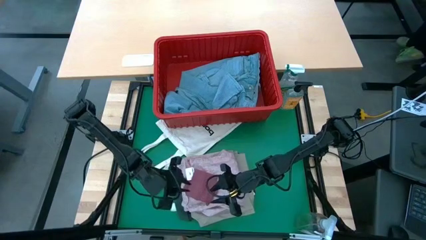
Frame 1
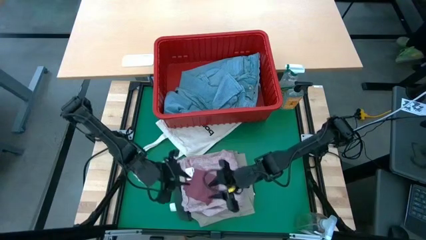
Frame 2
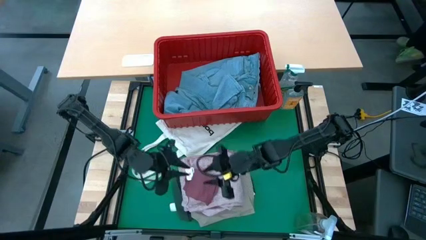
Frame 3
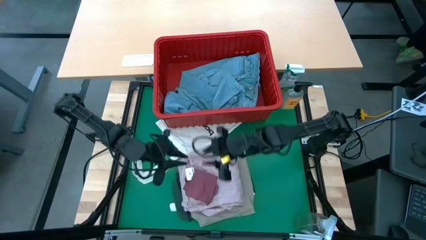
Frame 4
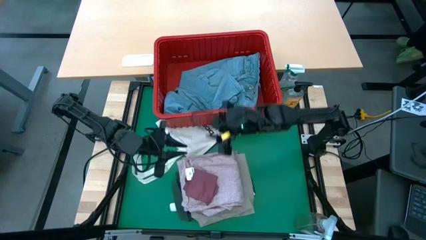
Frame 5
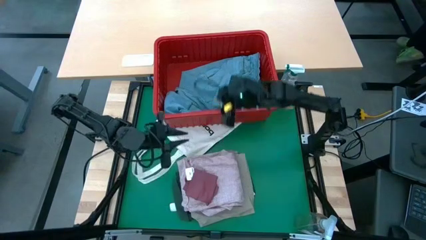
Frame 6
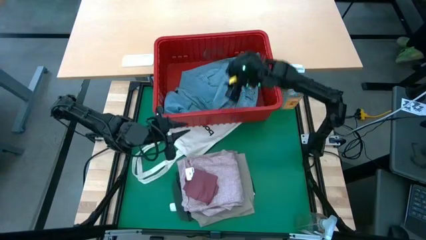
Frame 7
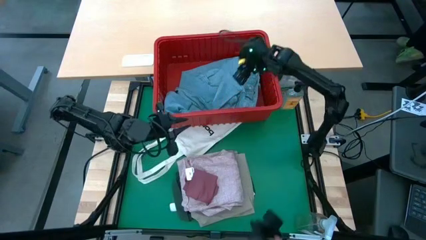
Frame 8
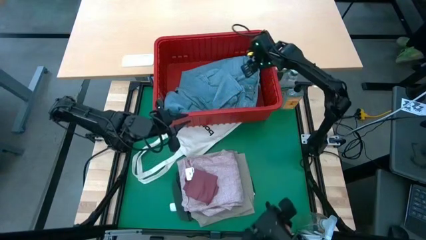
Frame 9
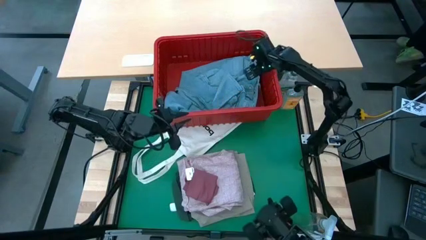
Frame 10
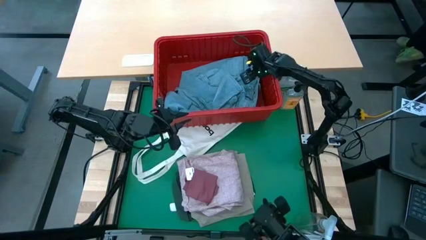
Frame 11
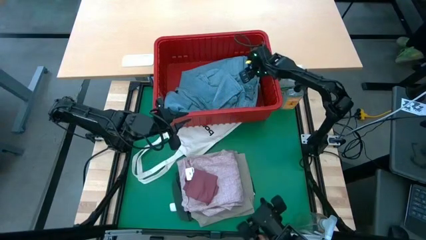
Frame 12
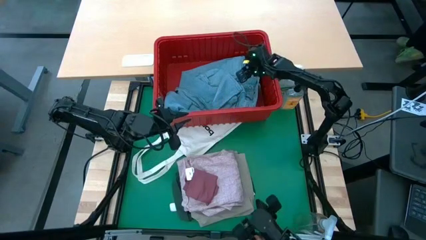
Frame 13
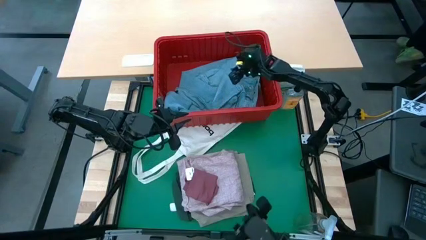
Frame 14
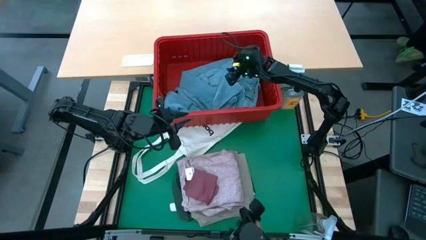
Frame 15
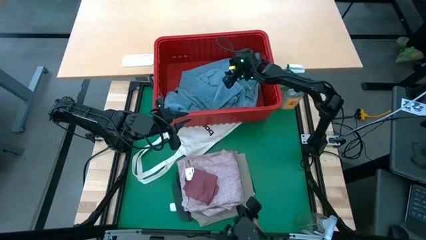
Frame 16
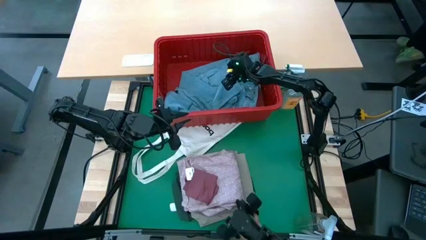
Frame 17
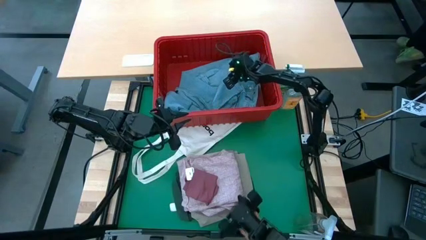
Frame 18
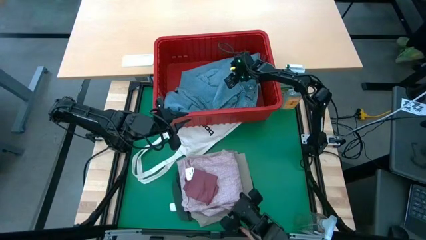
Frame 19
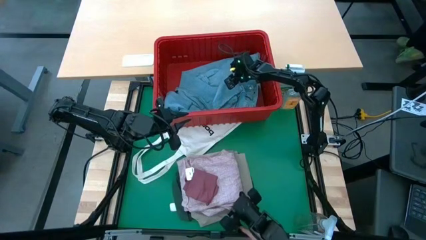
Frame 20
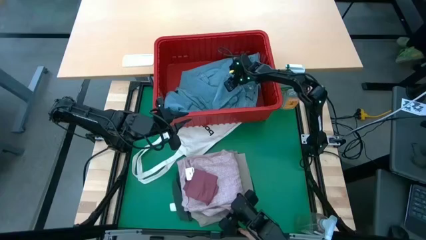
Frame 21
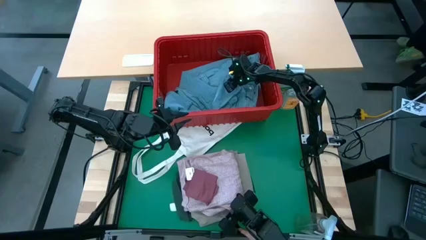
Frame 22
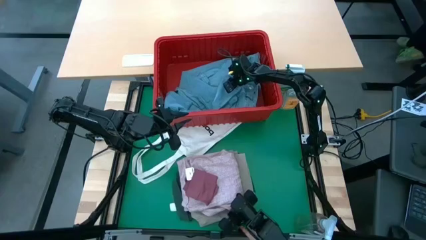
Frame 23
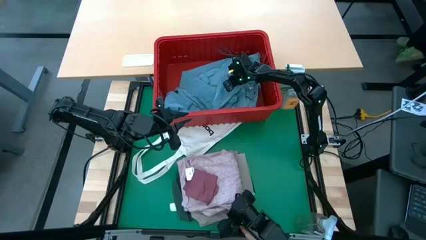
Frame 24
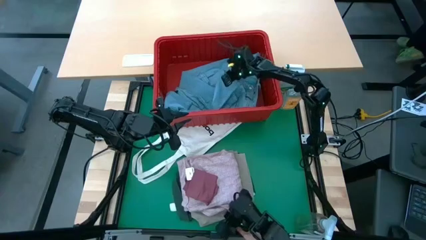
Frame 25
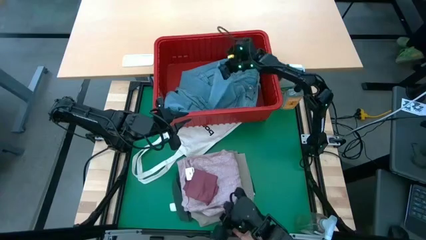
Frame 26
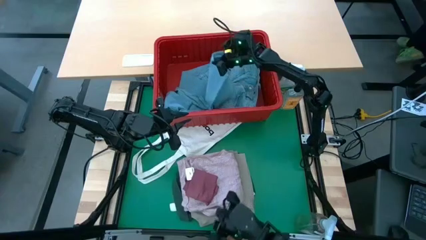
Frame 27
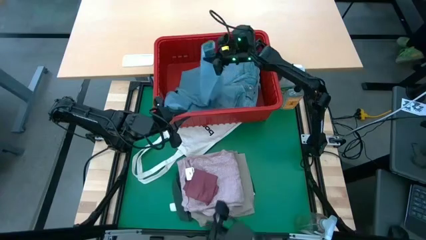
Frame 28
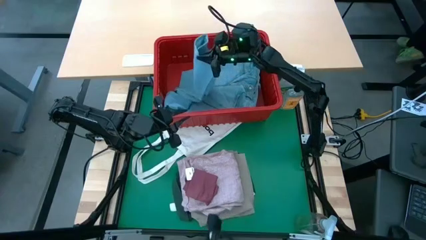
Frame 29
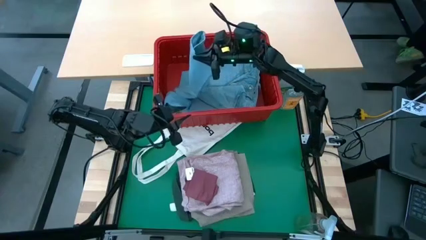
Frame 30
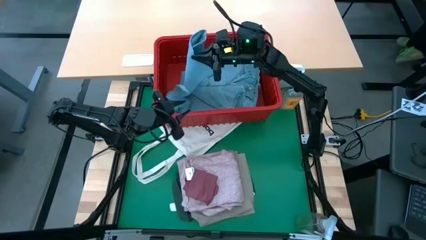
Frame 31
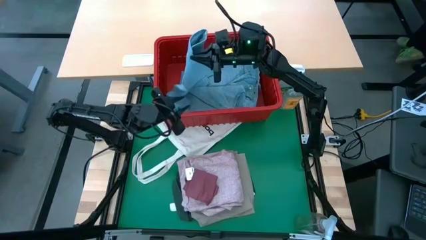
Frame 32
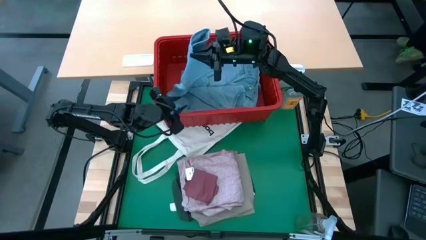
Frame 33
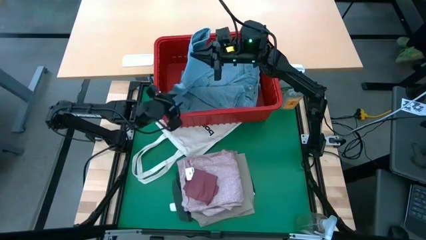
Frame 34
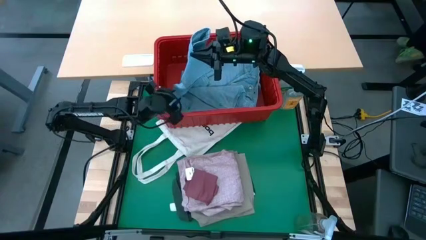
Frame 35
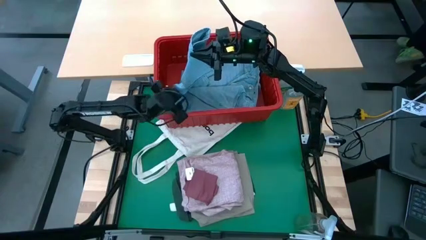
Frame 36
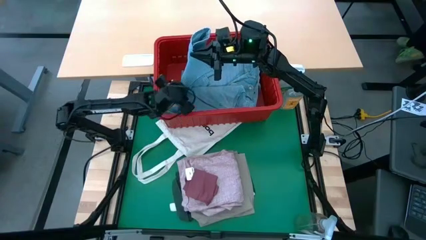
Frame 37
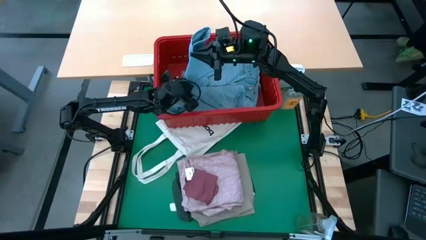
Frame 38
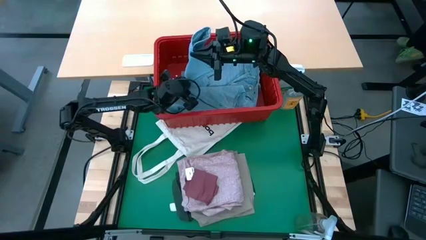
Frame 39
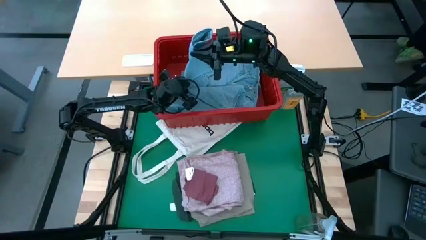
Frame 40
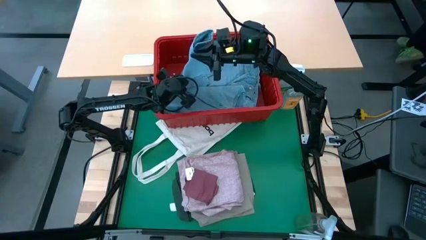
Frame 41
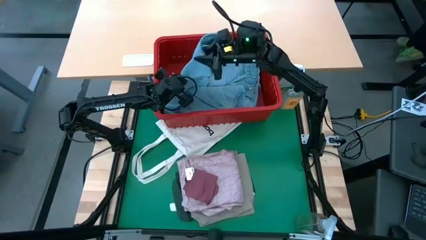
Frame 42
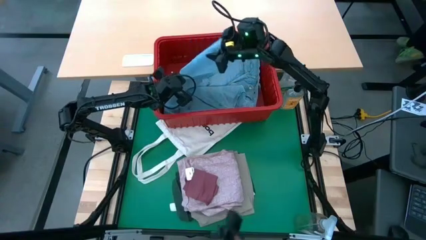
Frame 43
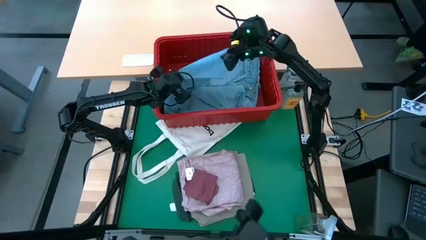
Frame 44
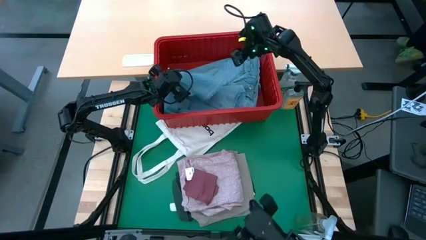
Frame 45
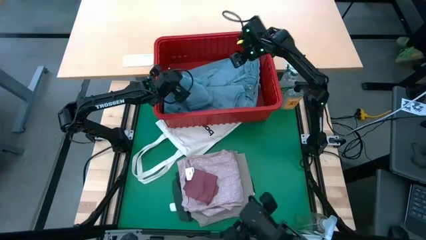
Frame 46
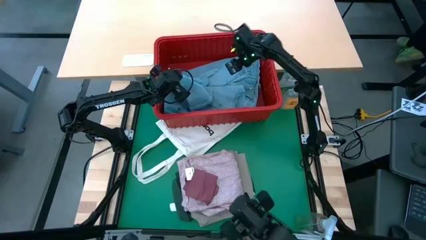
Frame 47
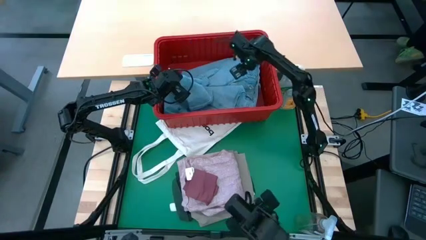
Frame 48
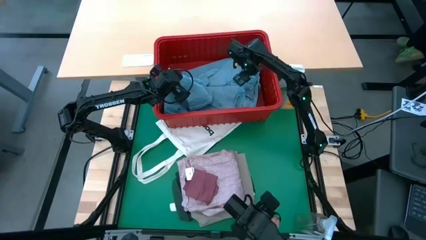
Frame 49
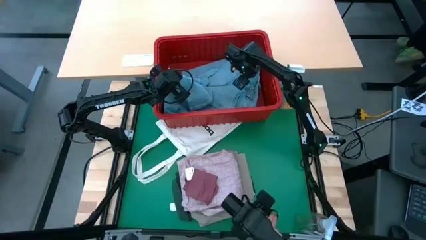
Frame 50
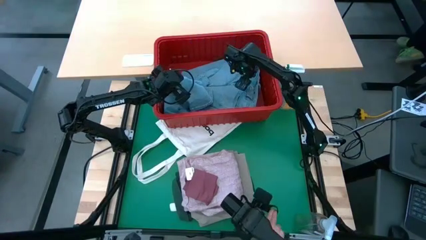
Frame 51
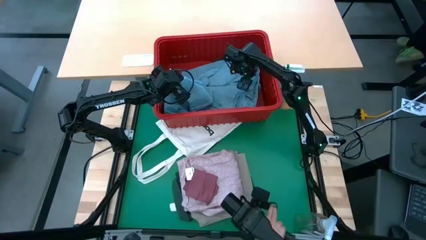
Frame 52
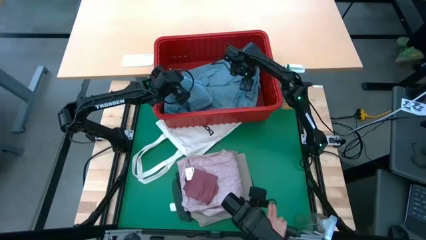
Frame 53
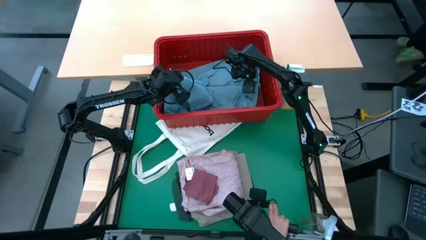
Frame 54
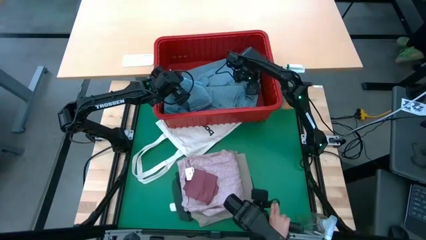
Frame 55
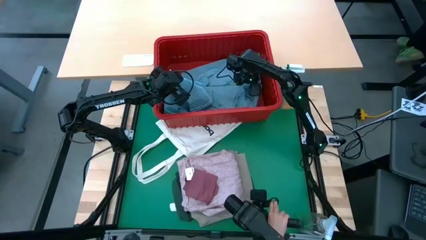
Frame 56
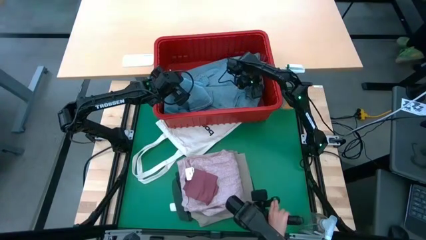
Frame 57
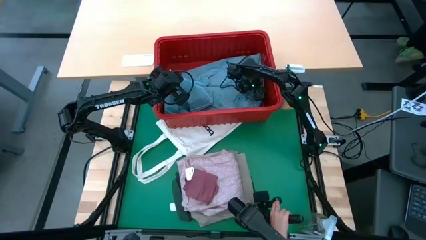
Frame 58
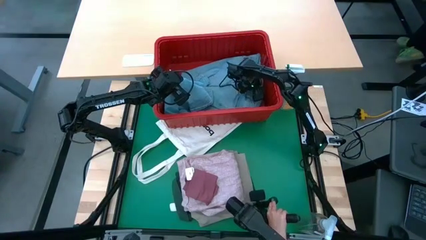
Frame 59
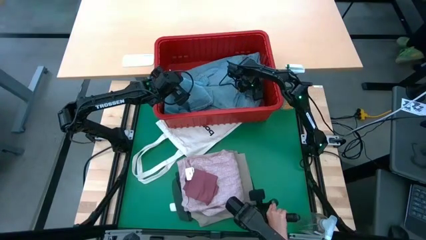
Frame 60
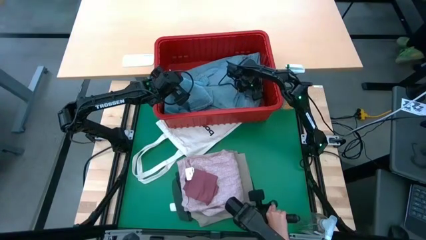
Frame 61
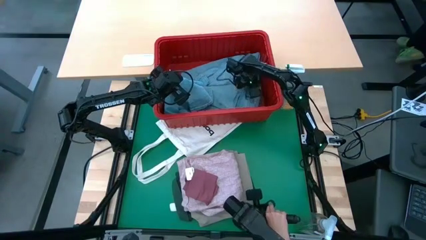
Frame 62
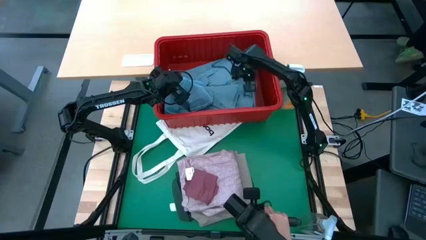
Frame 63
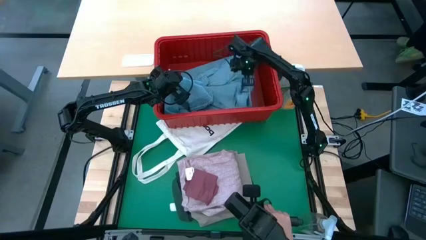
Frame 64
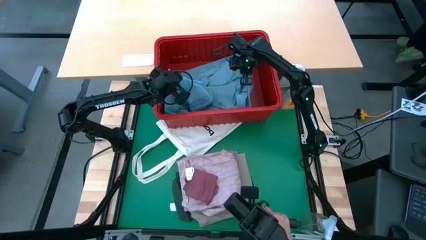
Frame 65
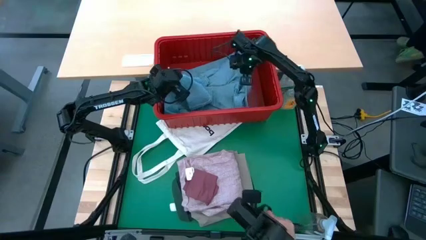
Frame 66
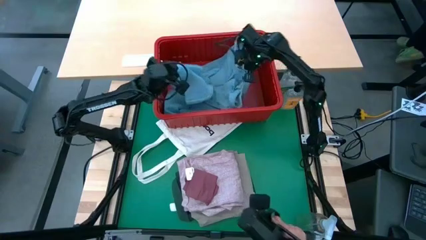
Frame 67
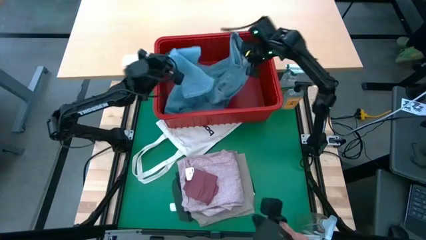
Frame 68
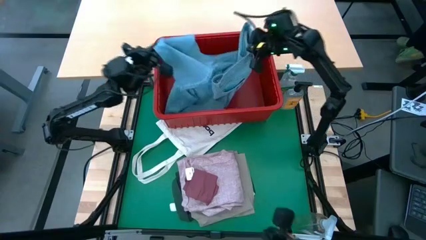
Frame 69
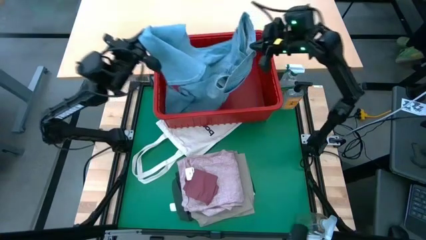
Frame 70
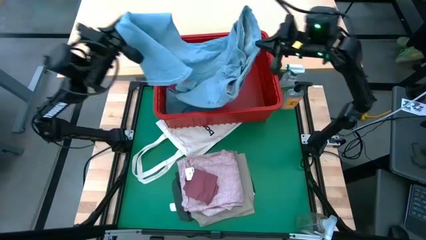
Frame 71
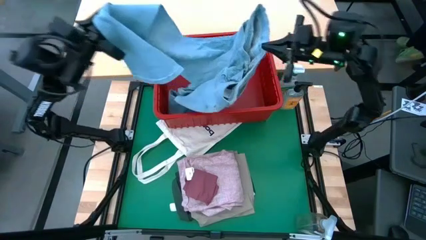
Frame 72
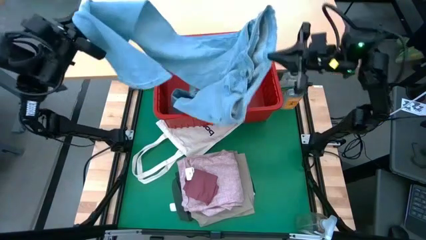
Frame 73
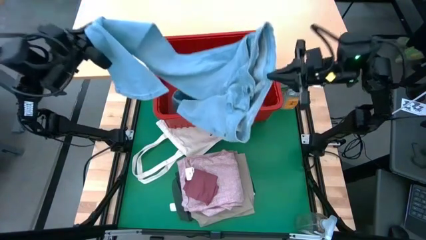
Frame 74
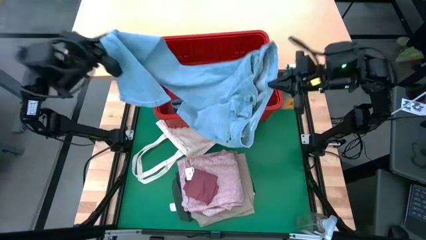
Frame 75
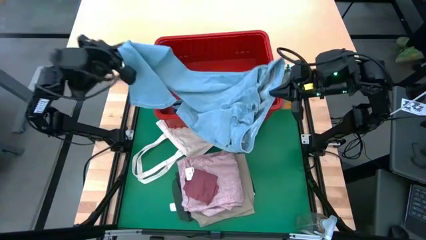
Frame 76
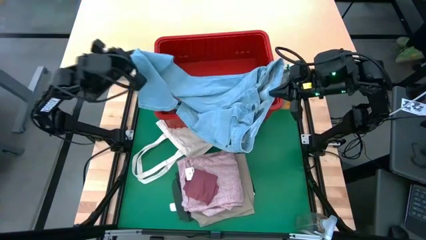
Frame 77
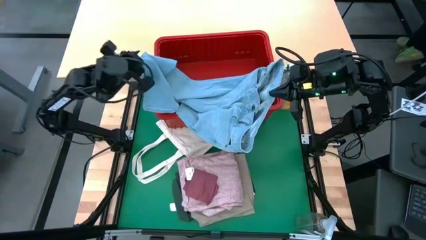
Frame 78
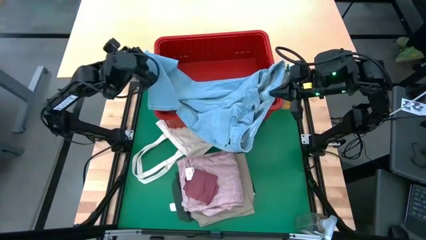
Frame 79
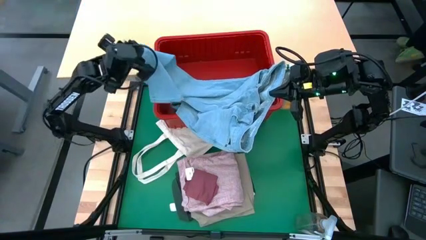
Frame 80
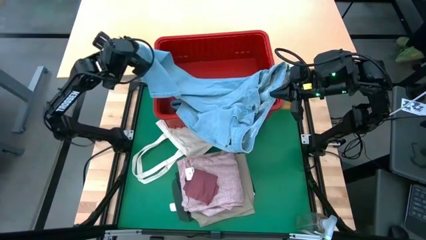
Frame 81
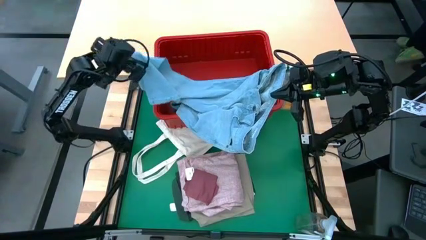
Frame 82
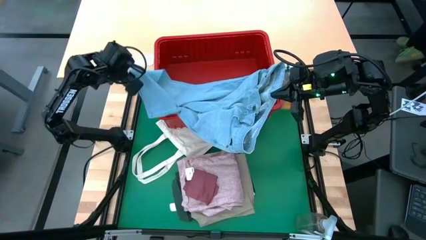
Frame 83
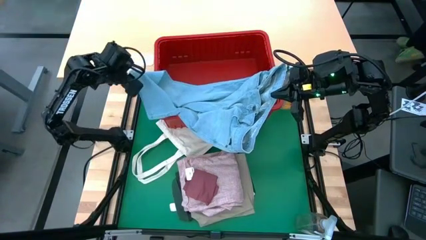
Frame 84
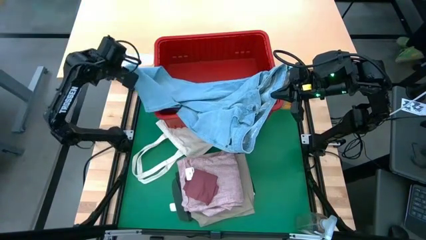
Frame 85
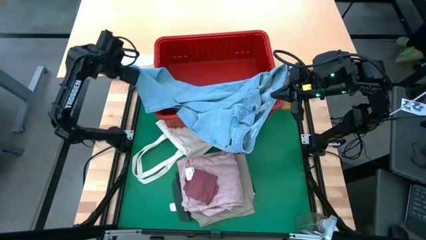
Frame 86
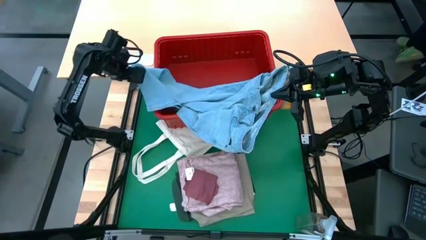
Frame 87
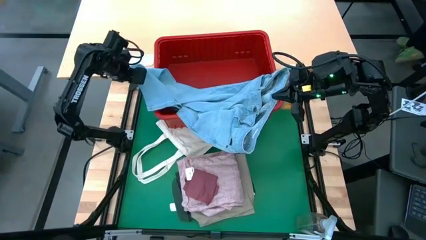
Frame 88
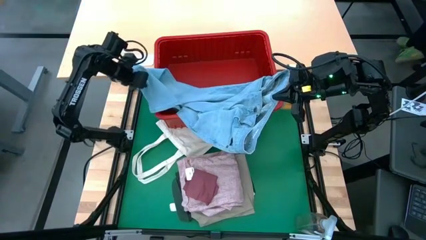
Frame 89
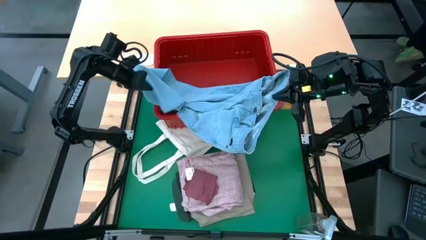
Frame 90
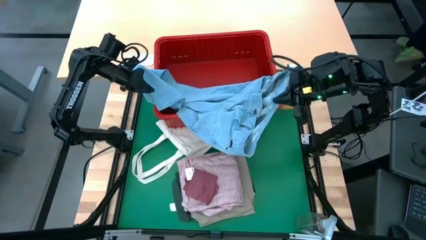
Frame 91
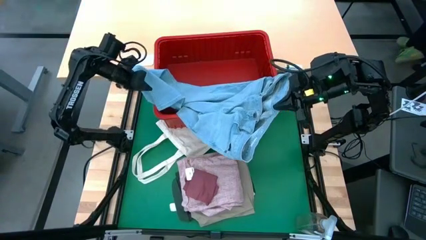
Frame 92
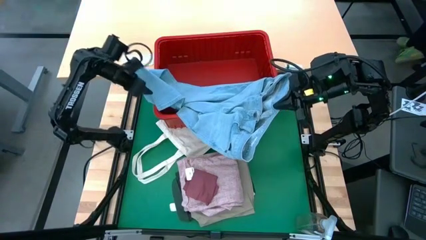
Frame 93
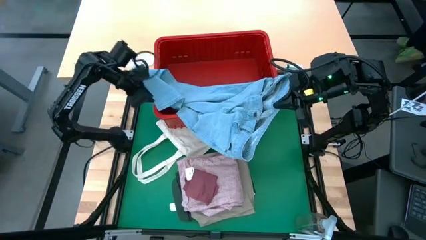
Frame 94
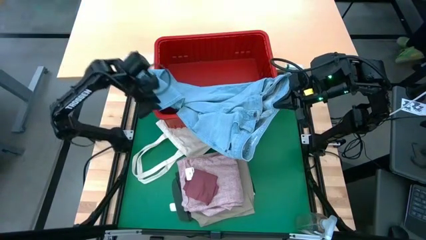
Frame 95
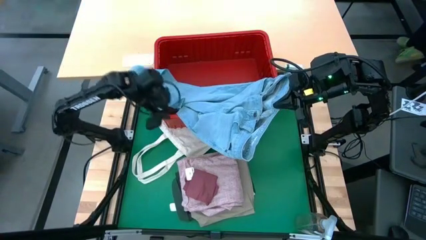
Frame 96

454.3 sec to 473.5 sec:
Task: Fold laundry
Fold the blue jeans
